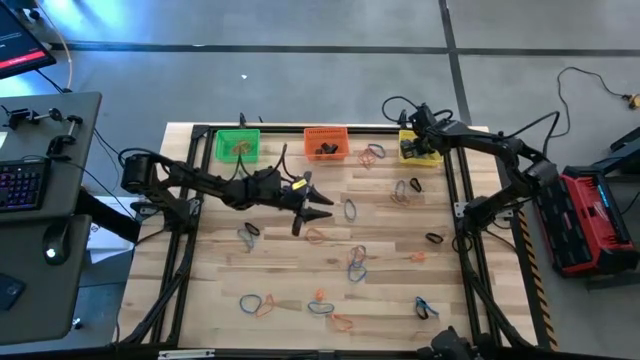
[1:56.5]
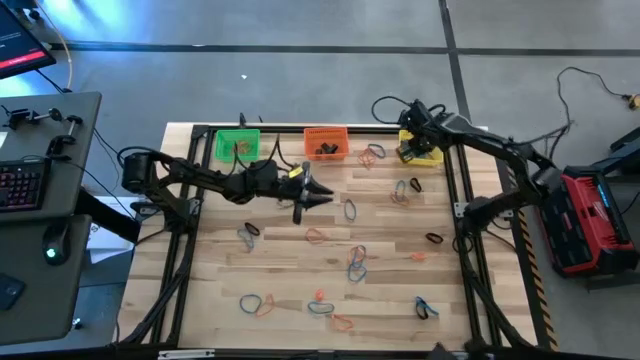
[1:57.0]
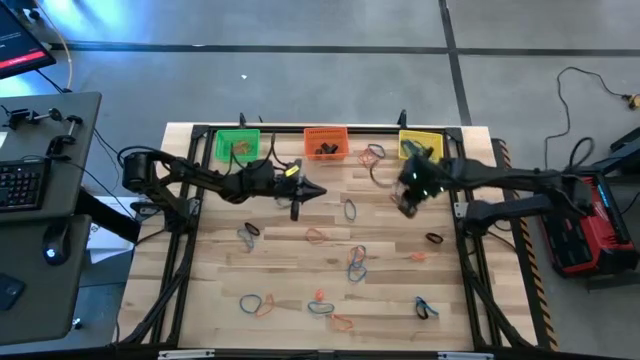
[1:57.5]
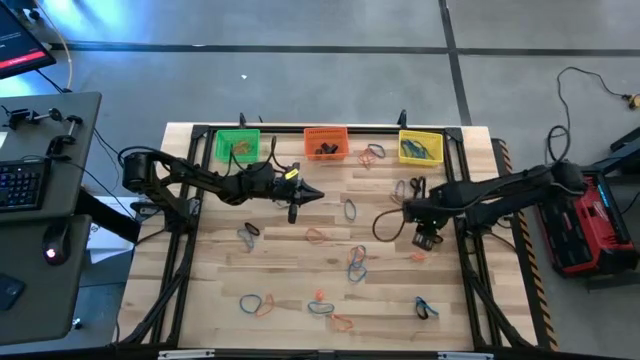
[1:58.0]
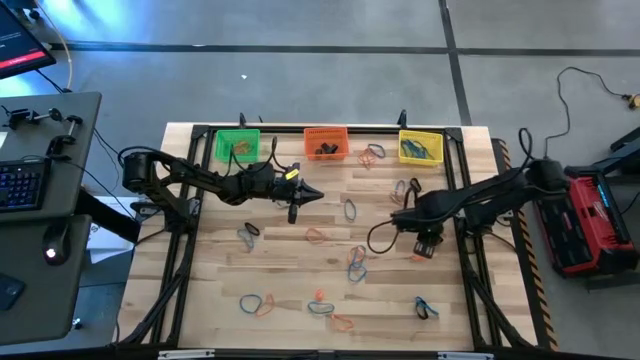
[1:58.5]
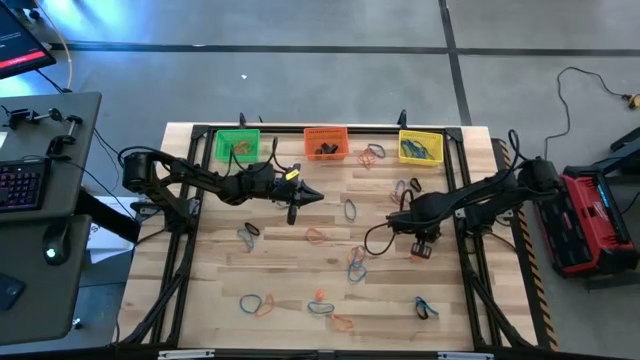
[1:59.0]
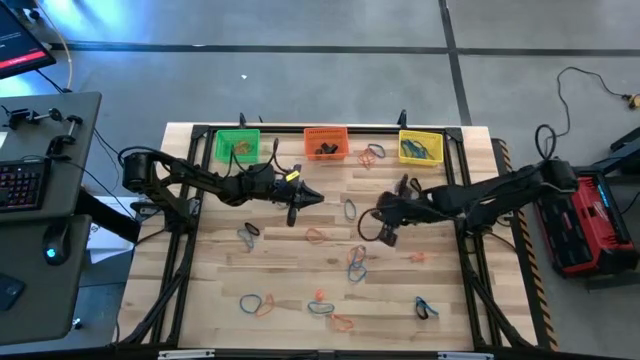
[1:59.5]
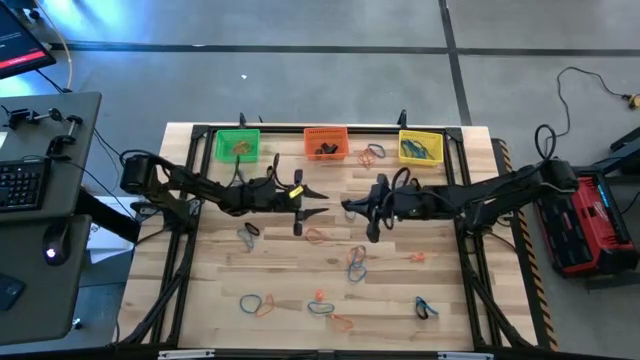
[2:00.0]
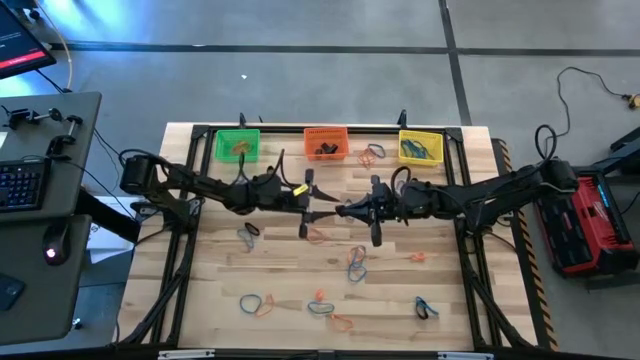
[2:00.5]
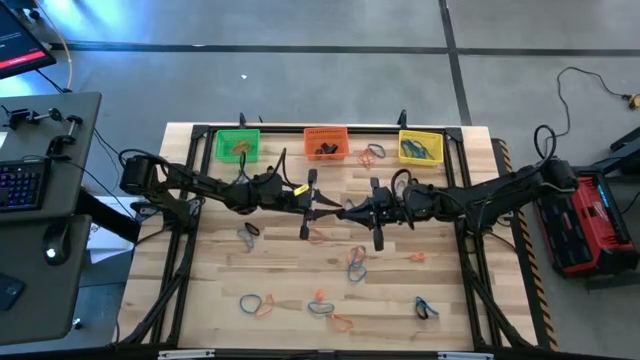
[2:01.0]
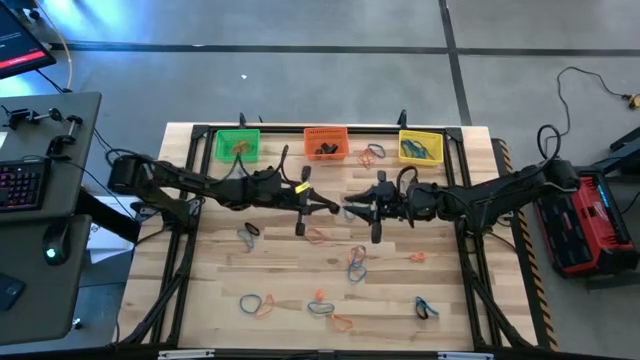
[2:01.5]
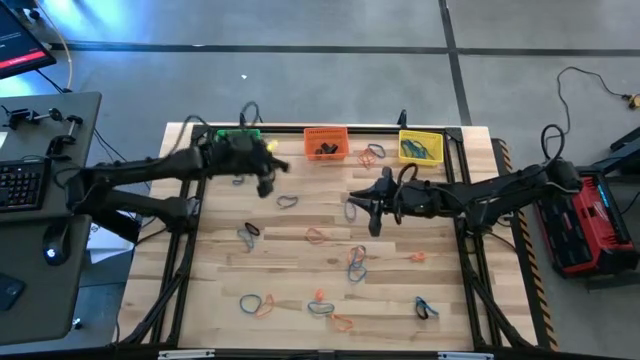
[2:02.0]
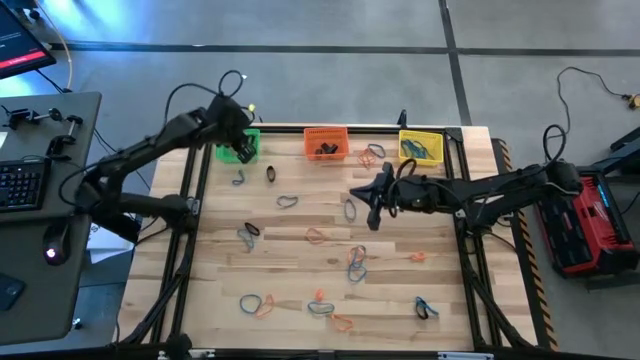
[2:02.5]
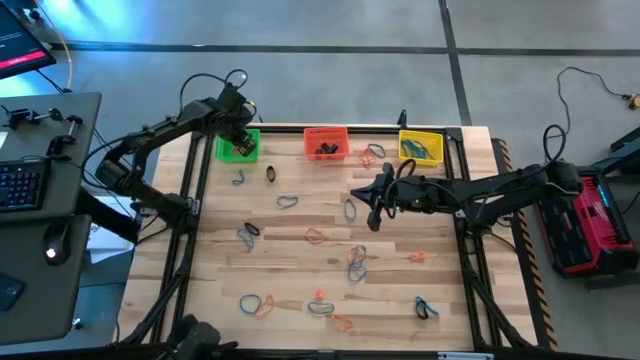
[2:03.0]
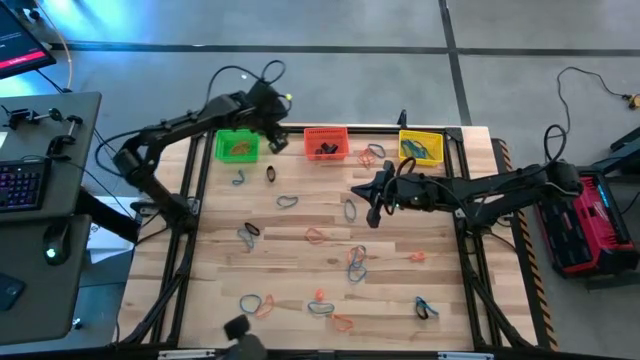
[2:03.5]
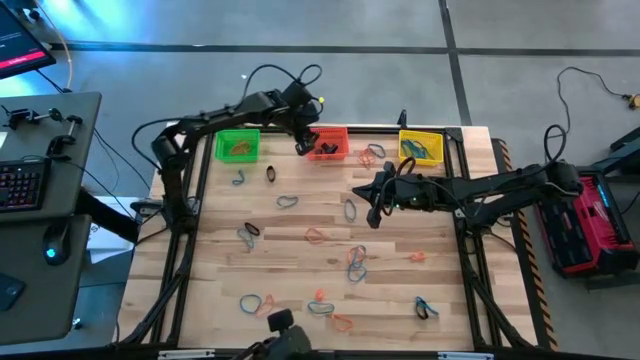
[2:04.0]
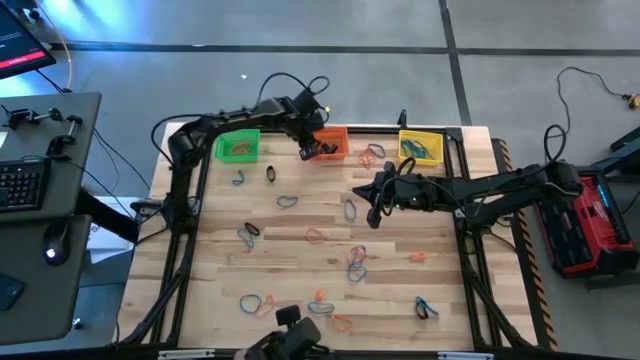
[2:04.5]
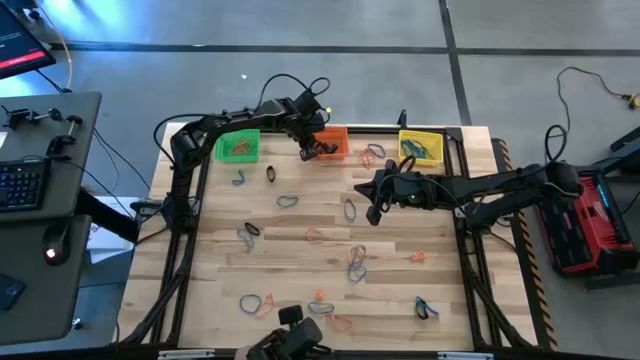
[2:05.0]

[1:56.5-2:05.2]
Task: Sort rubber bands into baskets
Put the black rubber band into the orange bin

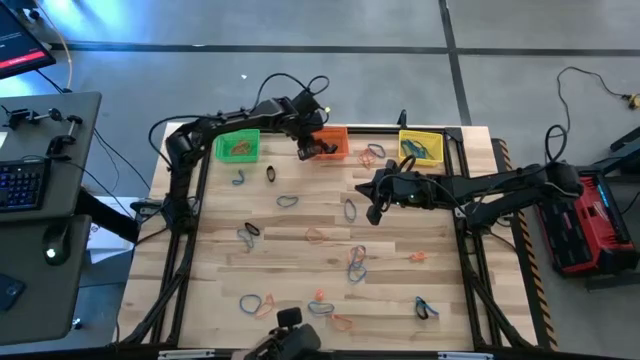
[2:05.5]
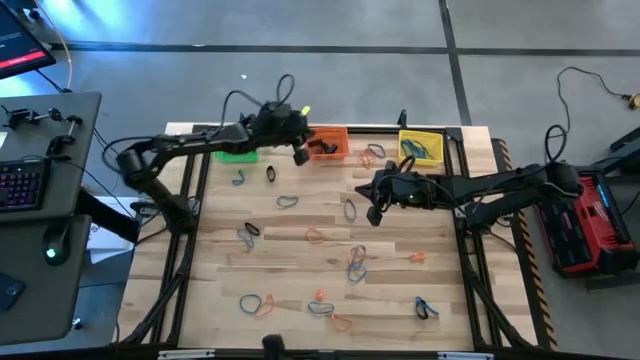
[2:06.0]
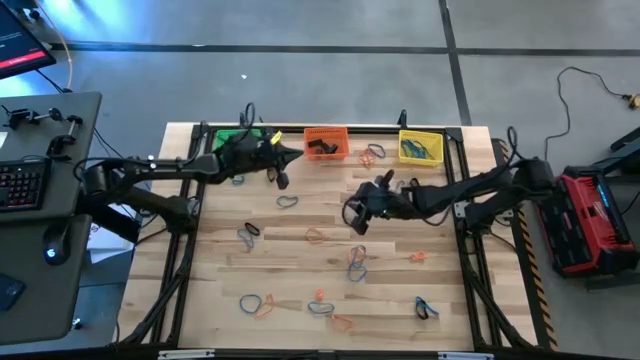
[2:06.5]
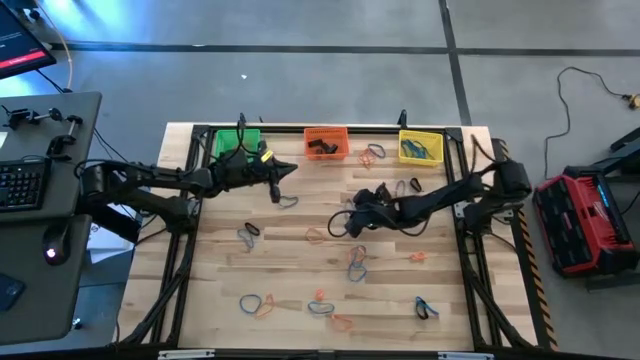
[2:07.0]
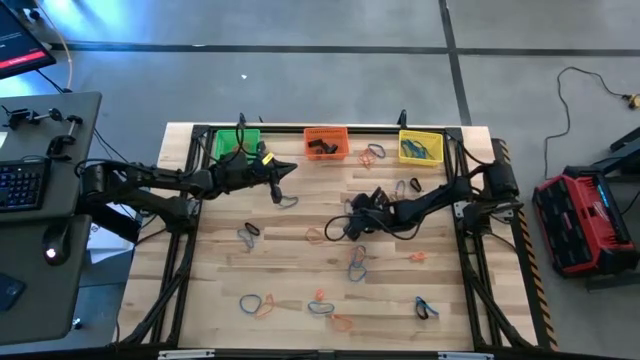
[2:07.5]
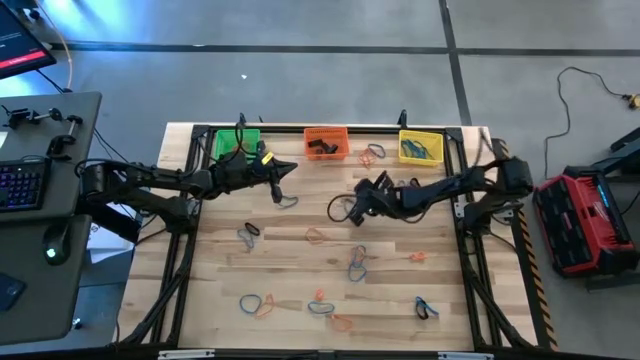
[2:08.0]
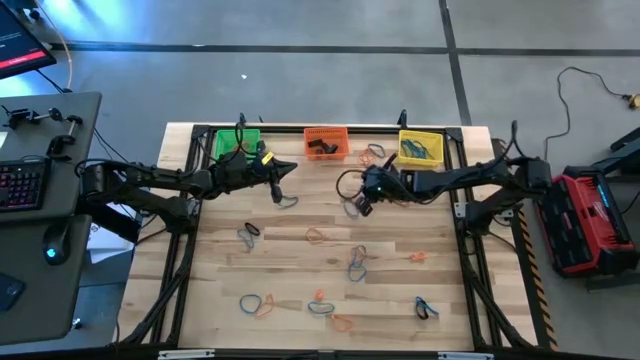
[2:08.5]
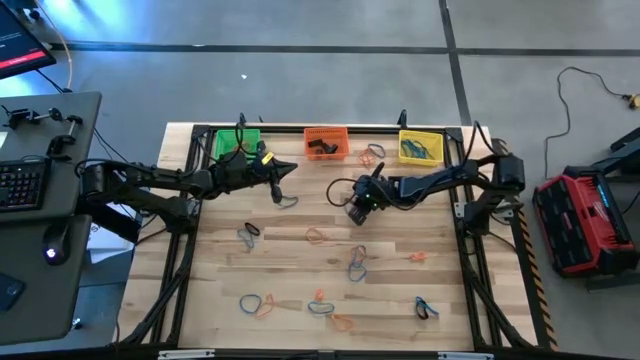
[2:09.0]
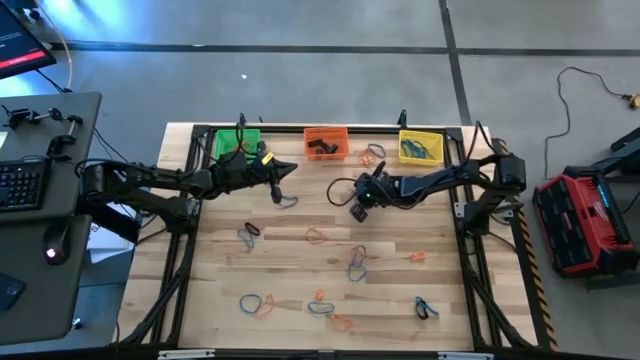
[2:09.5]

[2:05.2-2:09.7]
Put the blue rubber band into the yellow bin

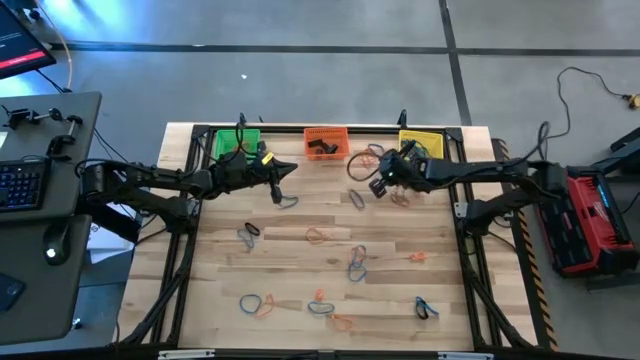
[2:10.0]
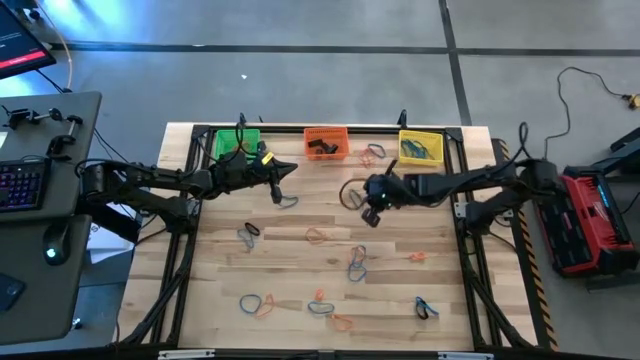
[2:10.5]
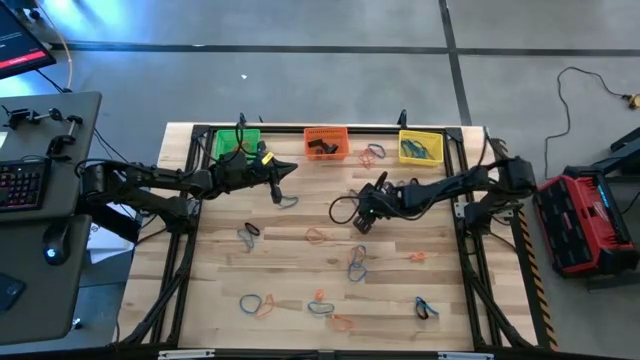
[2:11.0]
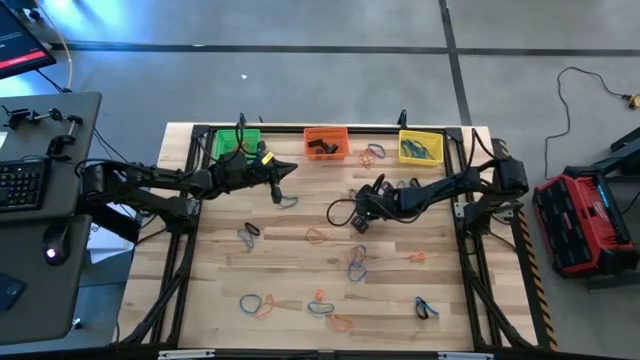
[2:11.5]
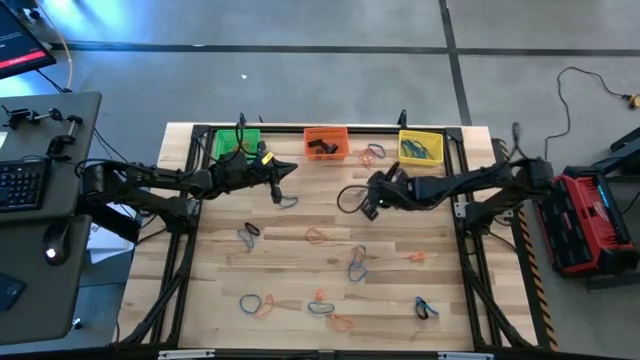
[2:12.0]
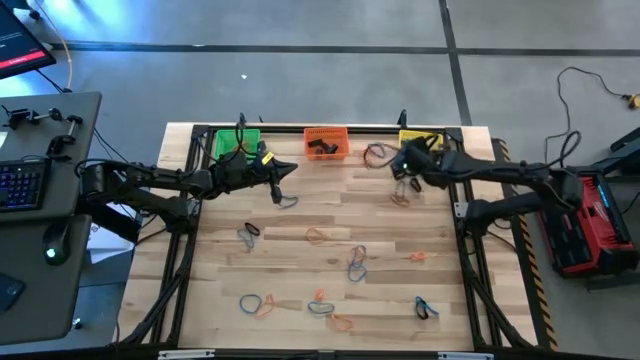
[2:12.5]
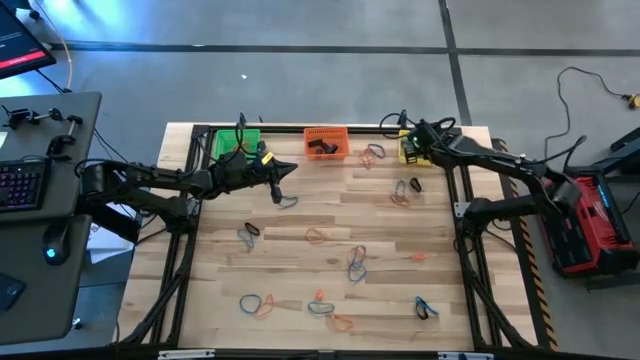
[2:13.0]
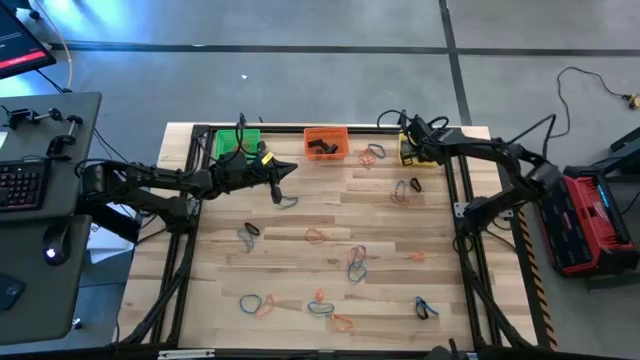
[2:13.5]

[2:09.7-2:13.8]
Put the blue rubber band into the yellow bin

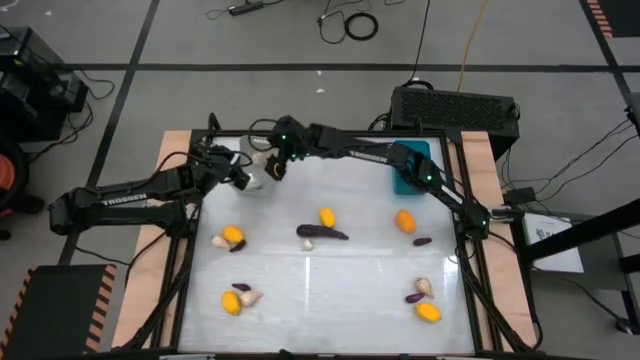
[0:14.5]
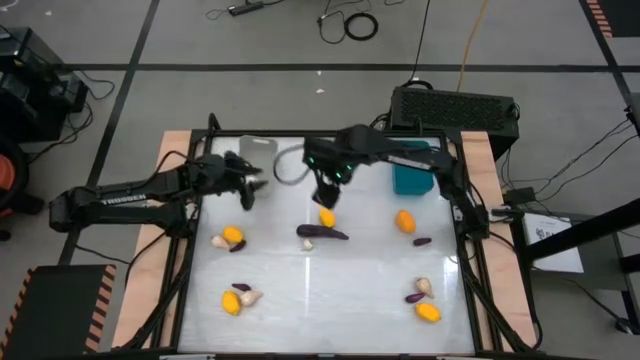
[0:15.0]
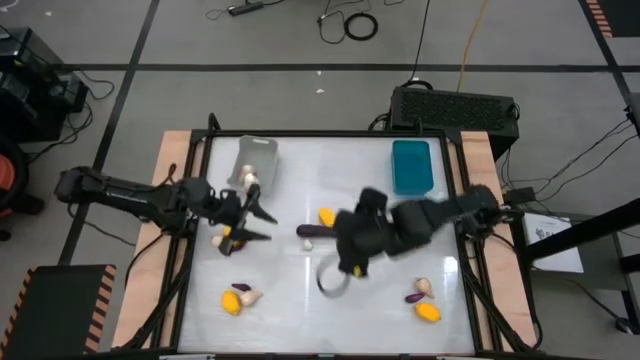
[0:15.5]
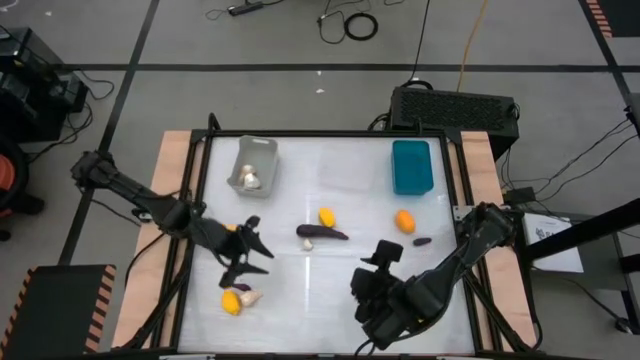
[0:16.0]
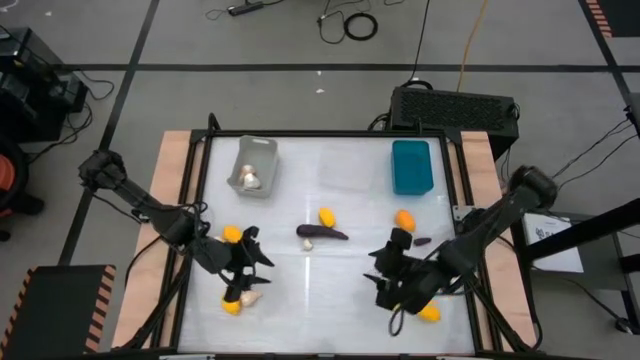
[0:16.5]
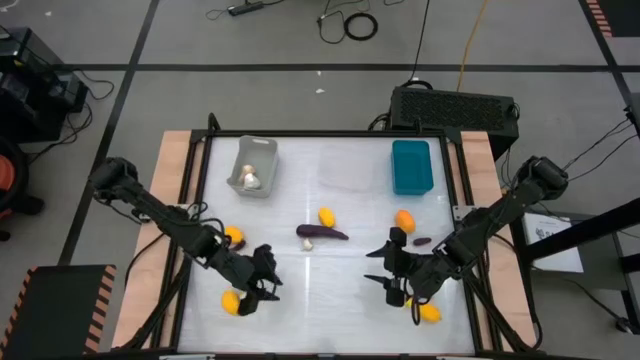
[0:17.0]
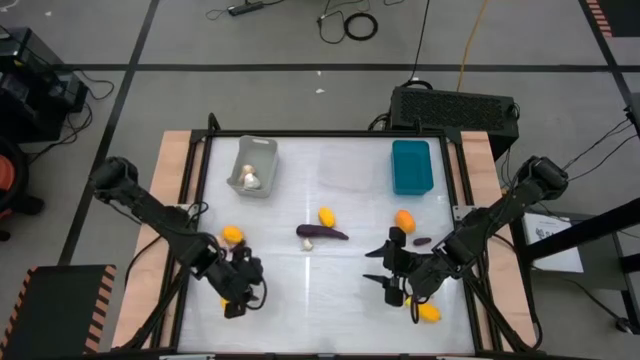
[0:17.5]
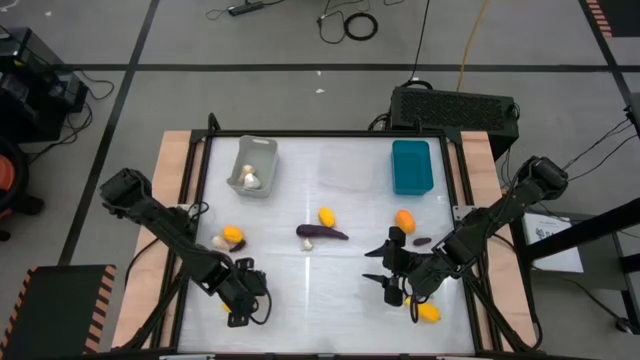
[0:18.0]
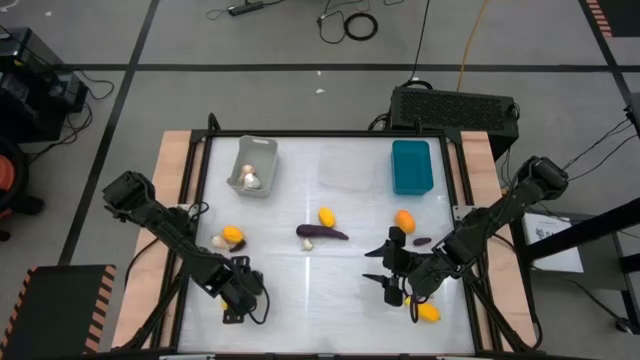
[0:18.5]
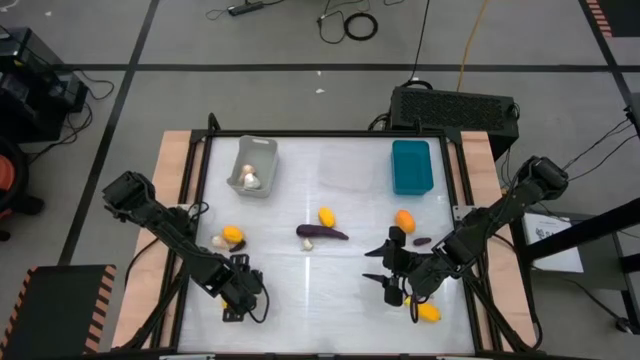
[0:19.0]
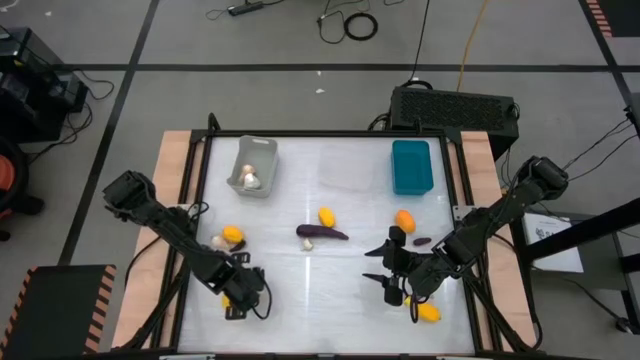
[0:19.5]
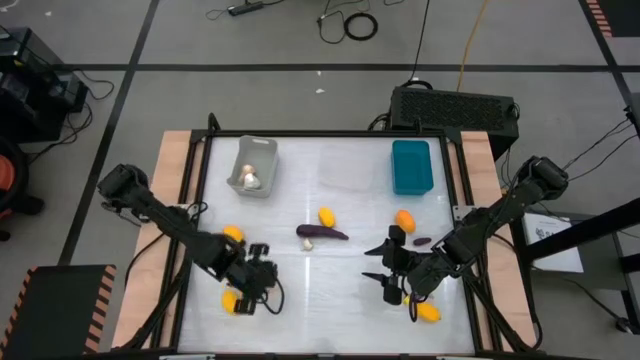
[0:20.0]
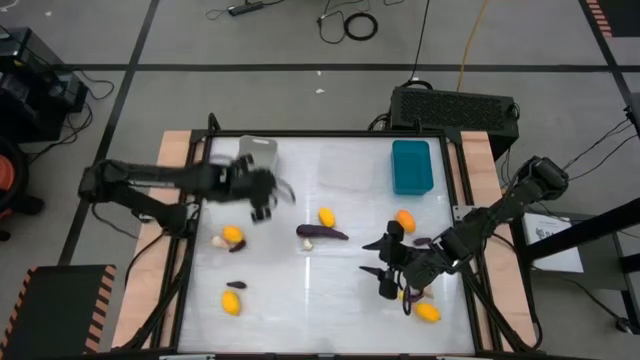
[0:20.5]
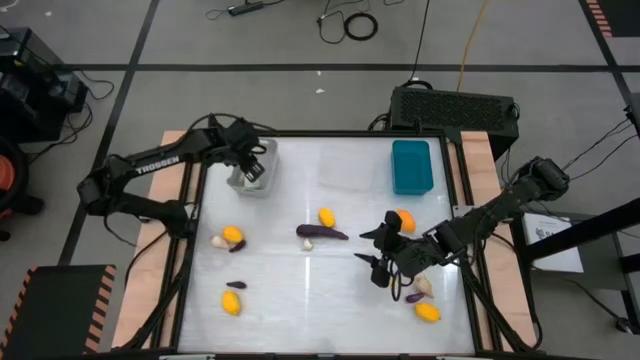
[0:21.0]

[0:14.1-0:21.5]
Task: Sort produce into baskets
Put the garlic into the gray bin
